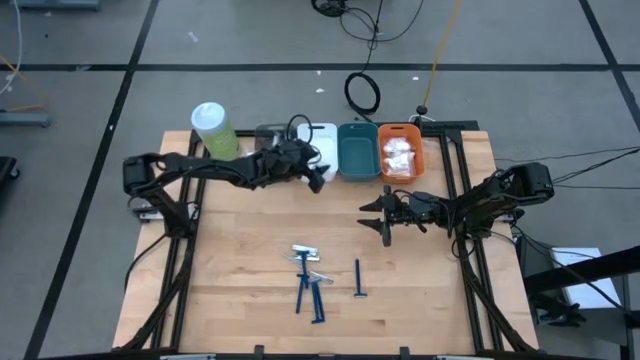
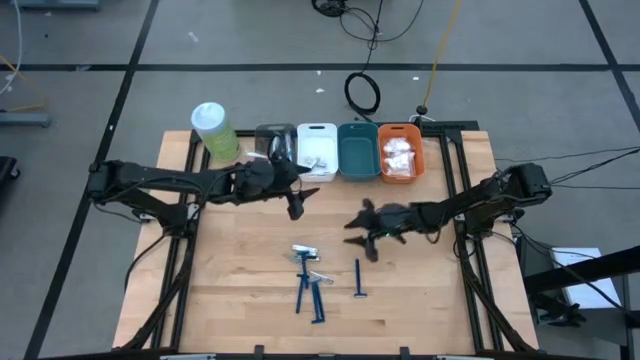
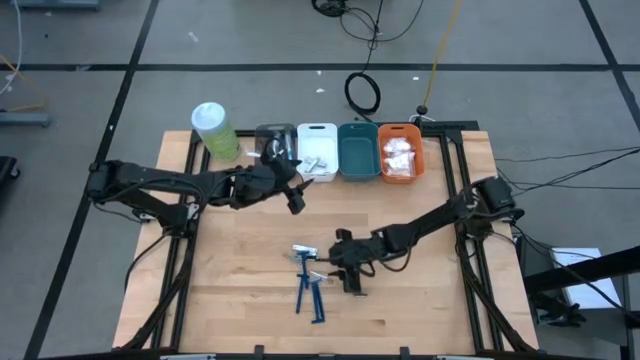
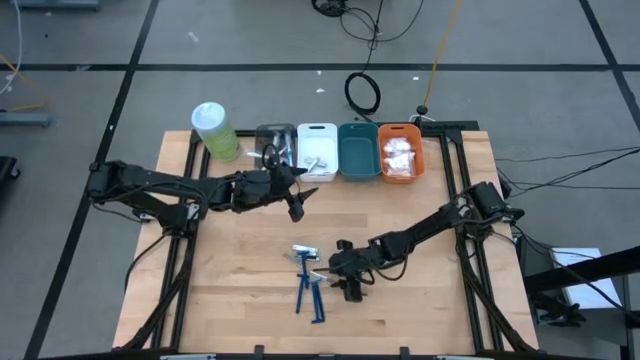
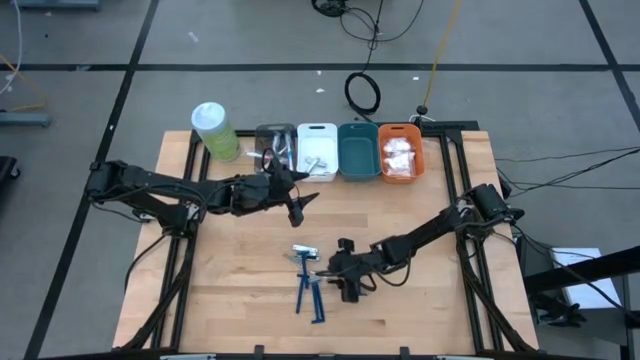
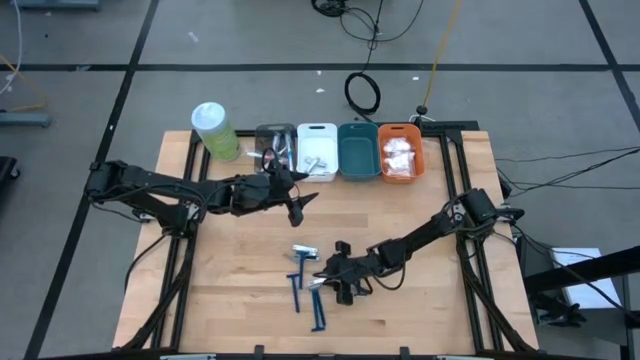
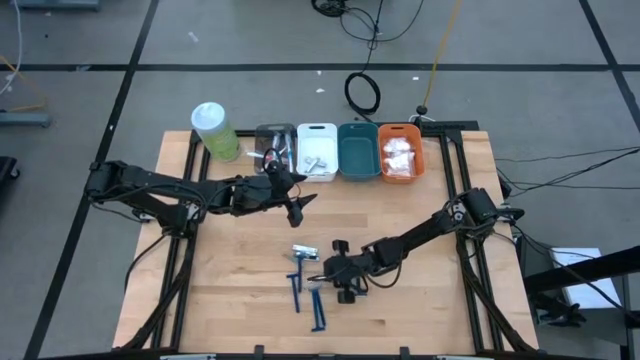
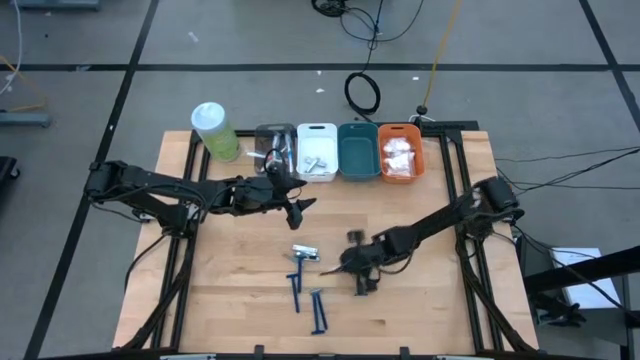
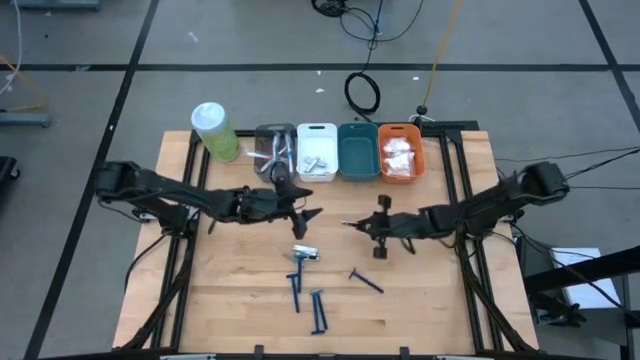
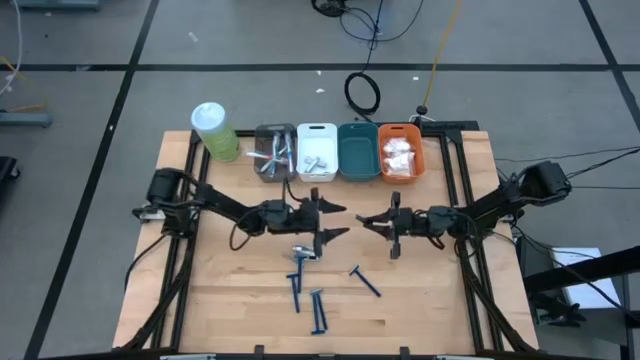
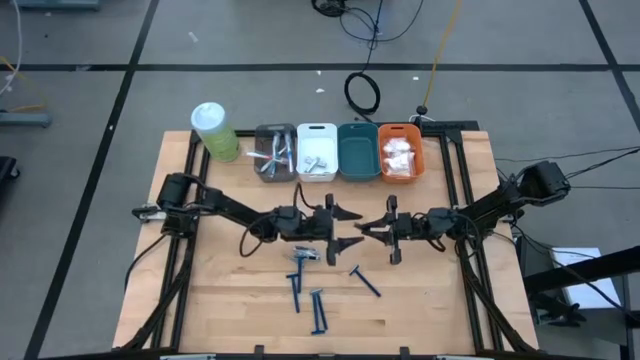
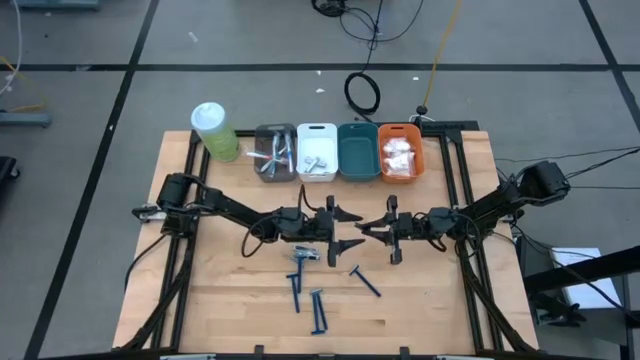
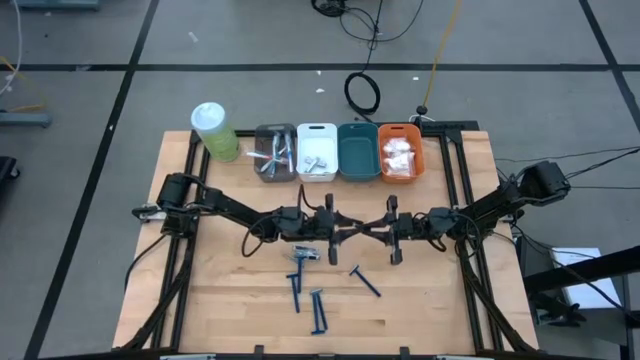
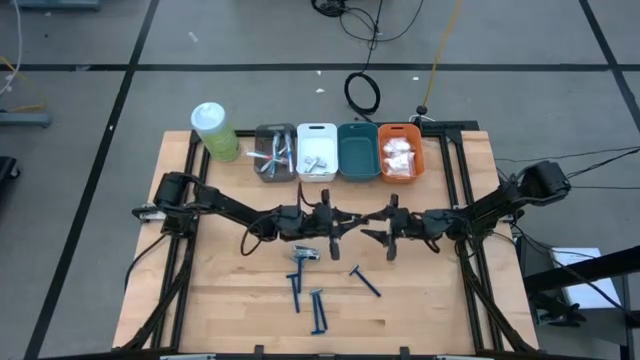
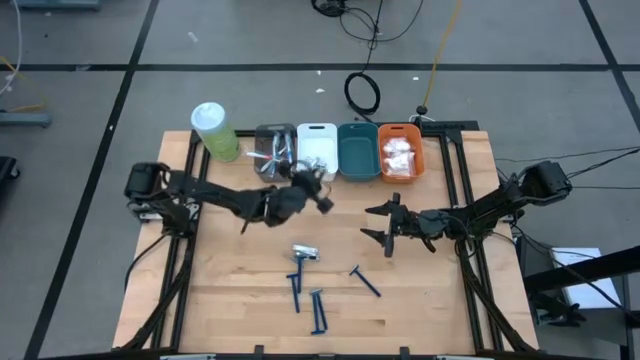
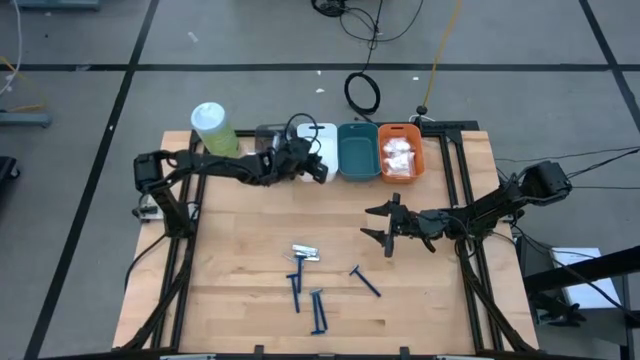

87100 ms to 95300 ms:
Task: Pick & Place Travel size toiletries
Put the silver nail cutter into the white bin

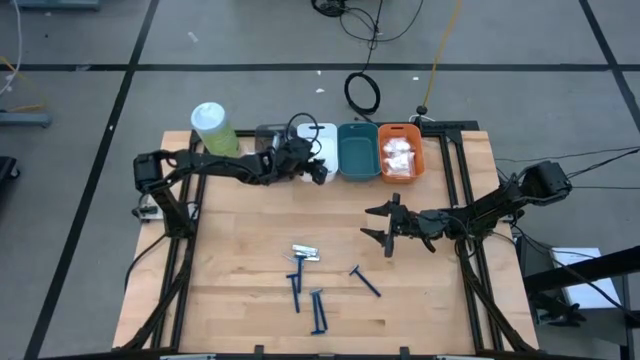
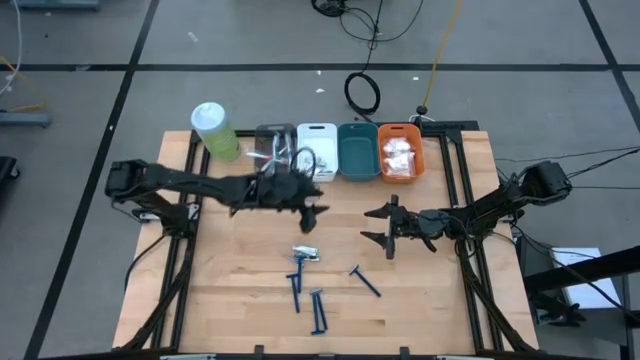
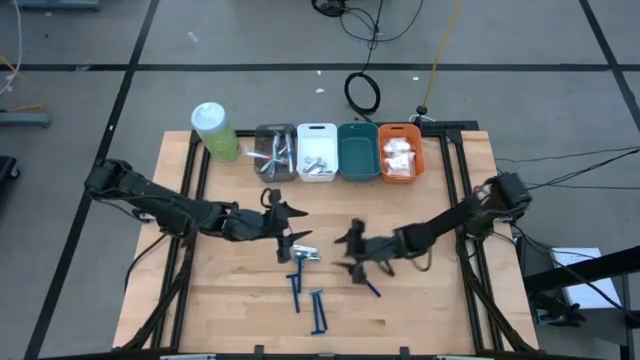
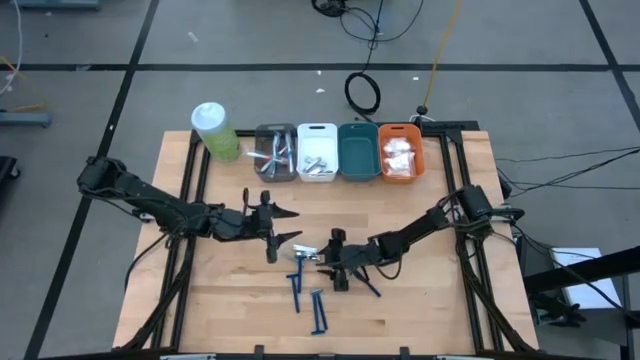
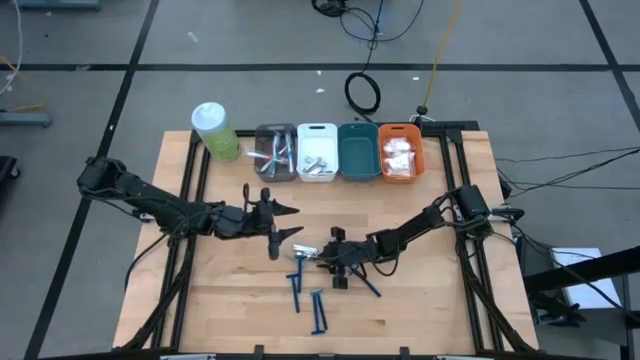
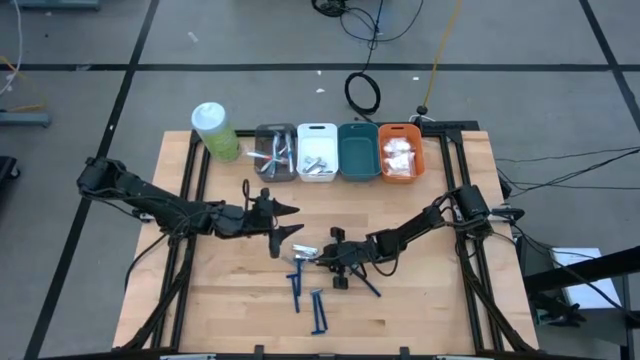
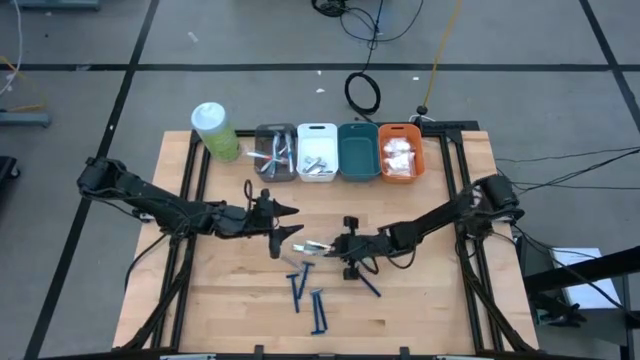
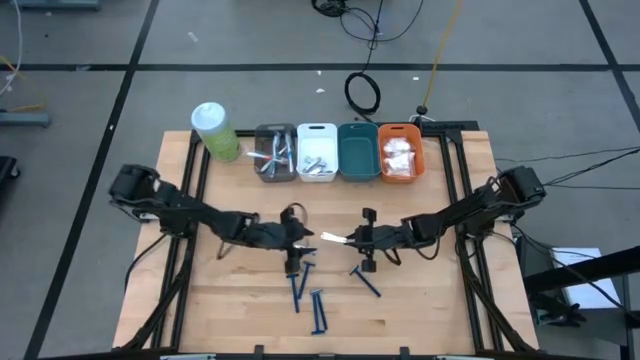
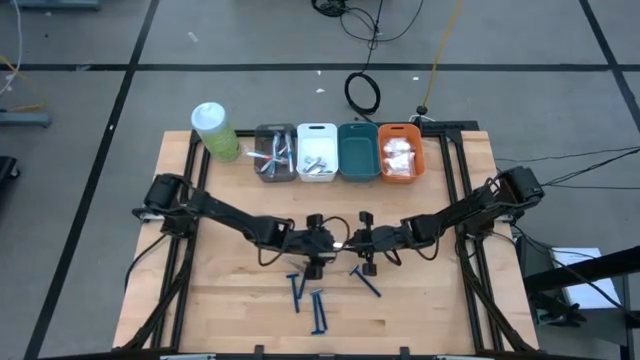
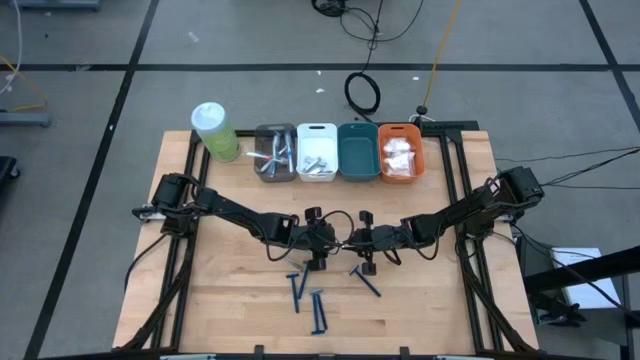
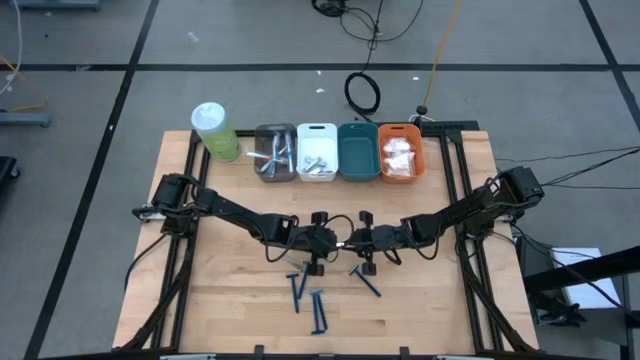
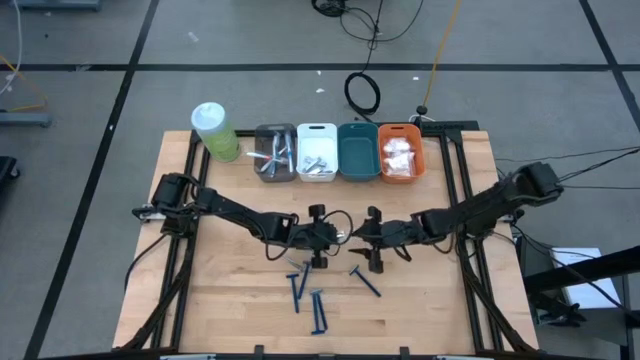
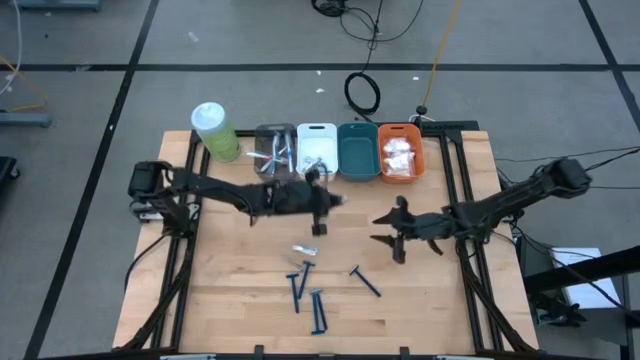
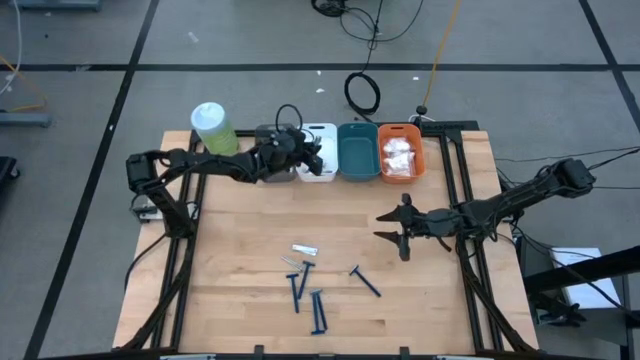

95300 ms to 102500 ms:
Put the silver nail cutter into the white bin

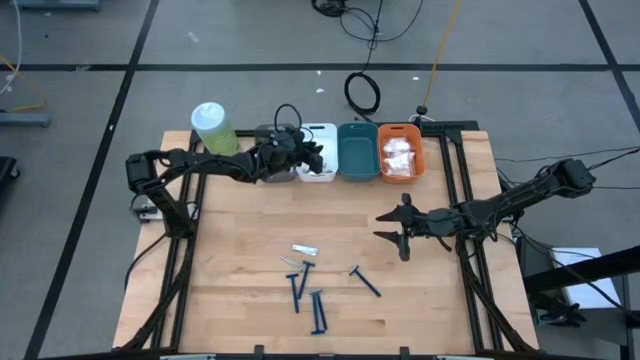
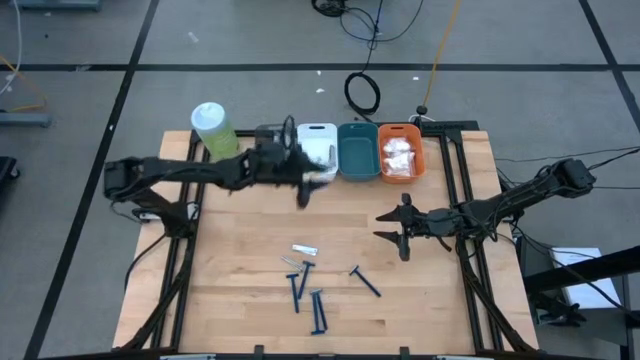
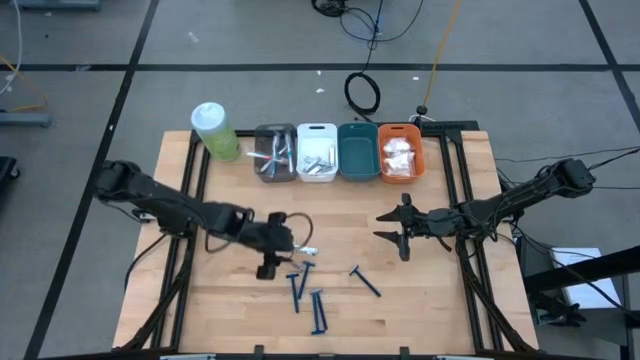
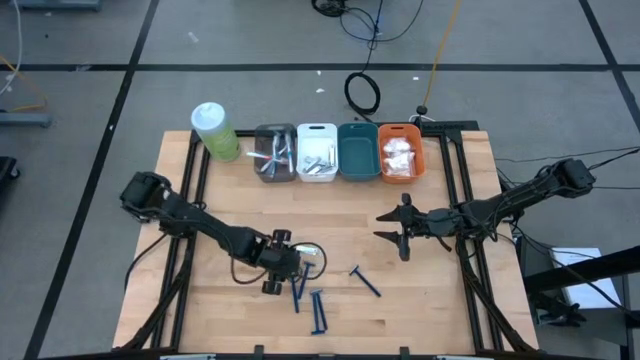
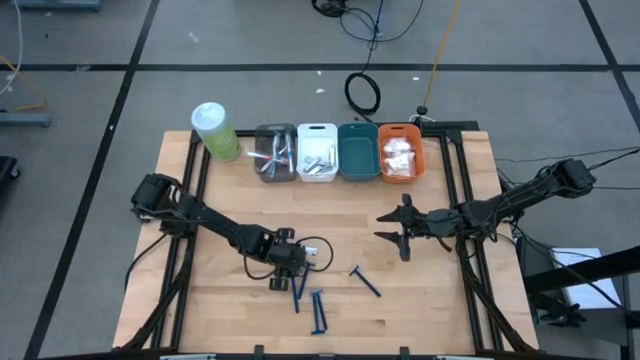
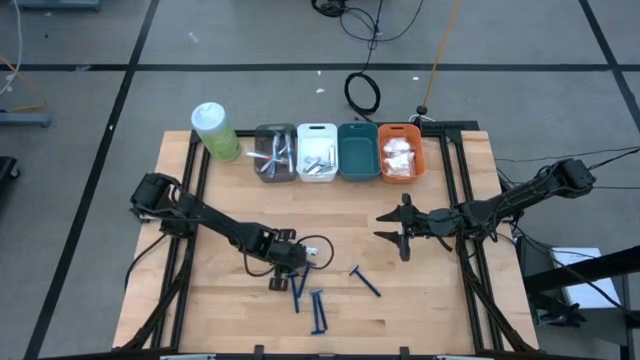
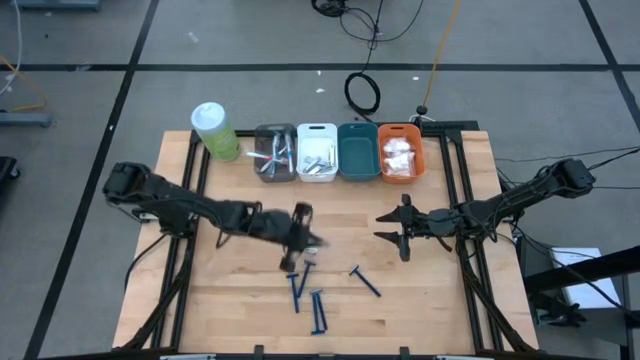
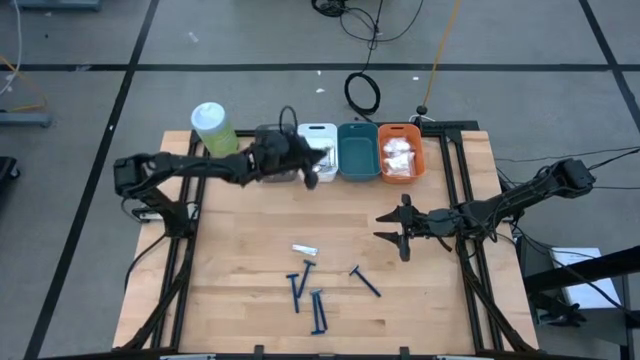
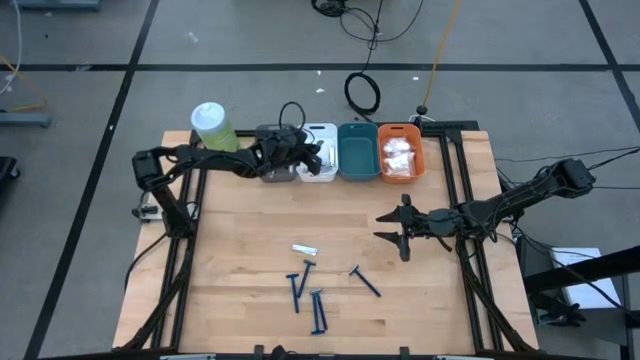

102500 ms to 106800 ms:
Put the silver nail cutter into the white bin

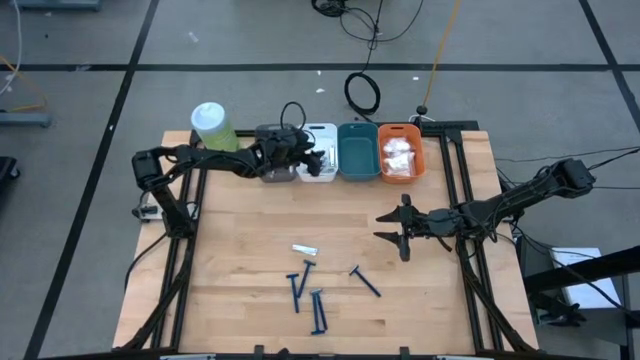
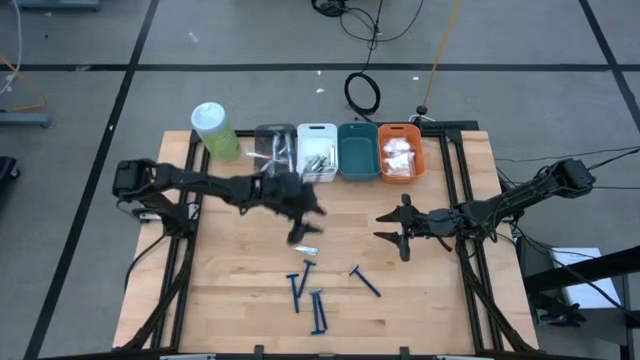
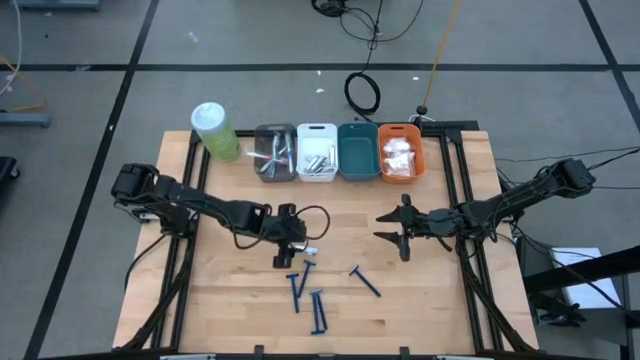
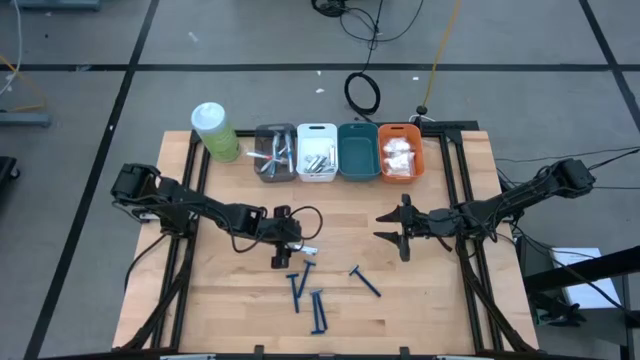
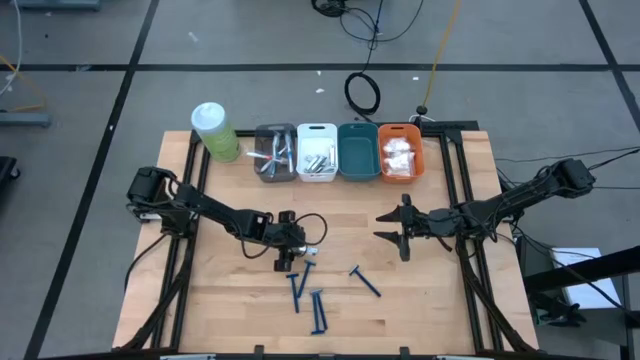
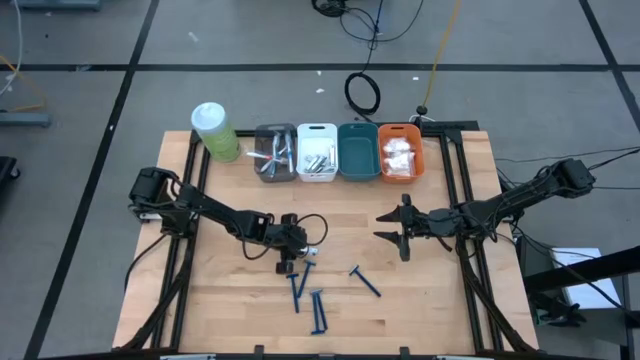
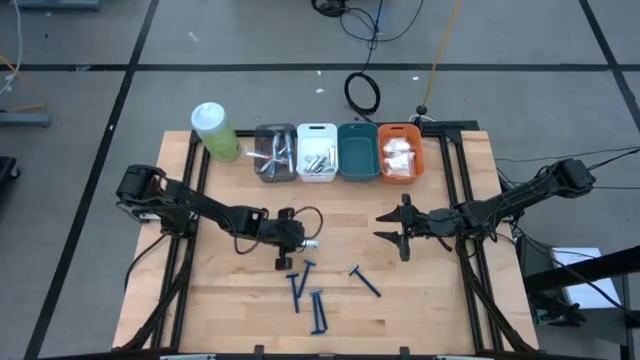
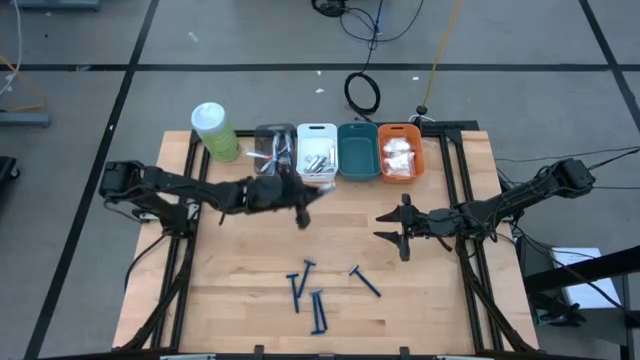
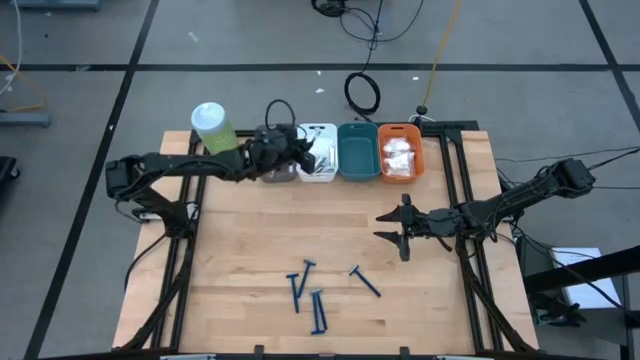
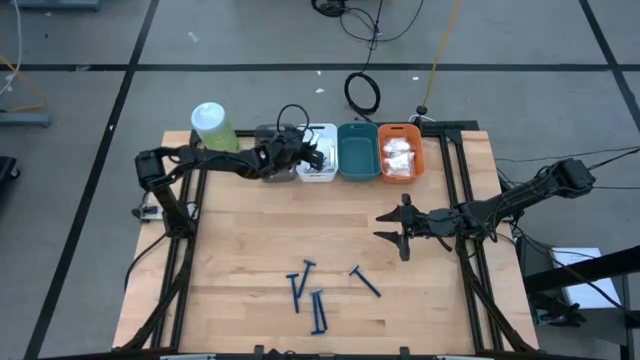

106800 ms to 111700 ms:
Put the silver nail cutter into the white bin
